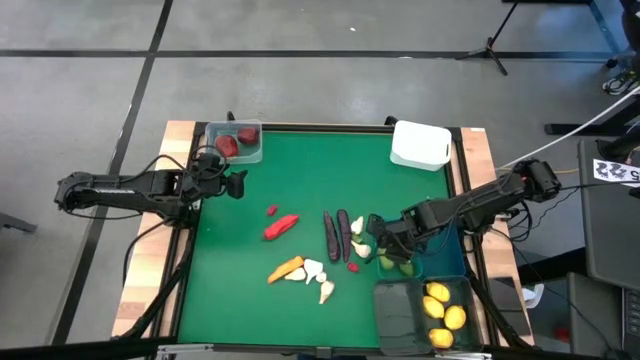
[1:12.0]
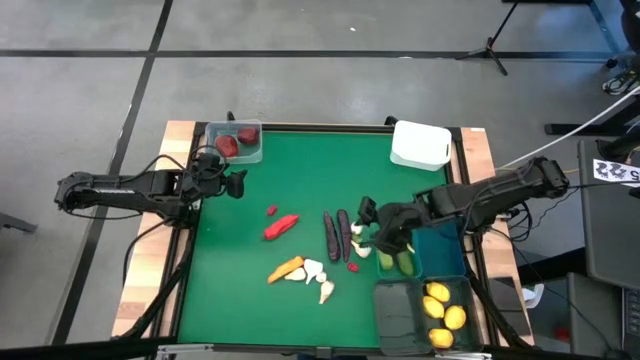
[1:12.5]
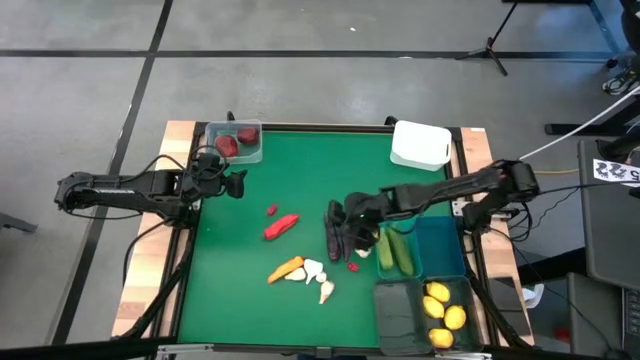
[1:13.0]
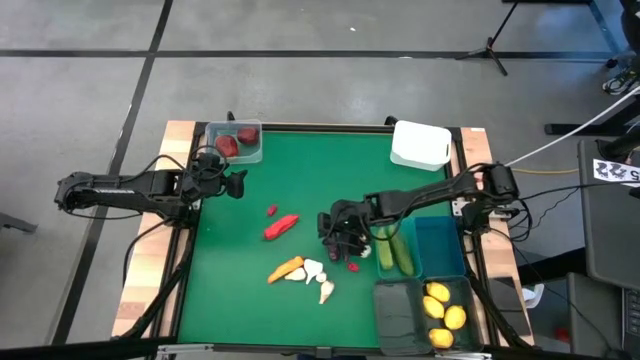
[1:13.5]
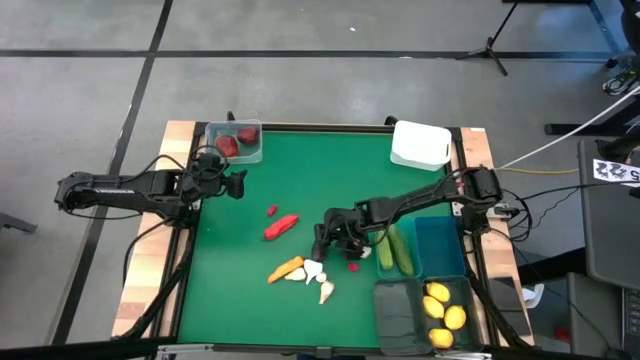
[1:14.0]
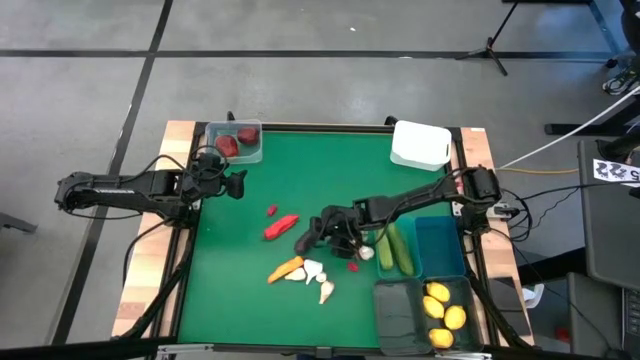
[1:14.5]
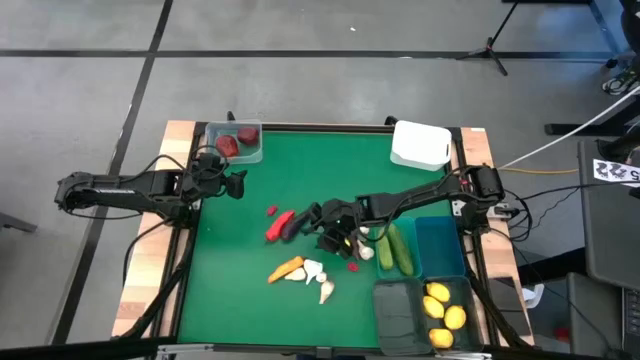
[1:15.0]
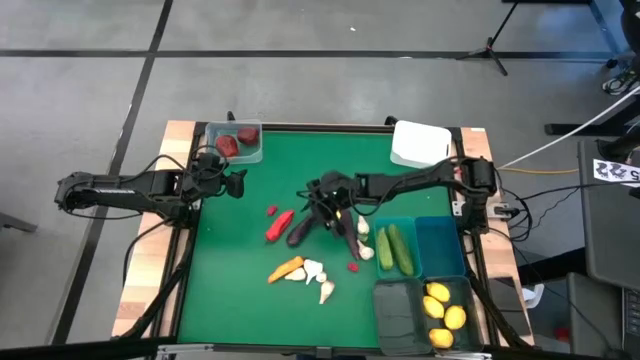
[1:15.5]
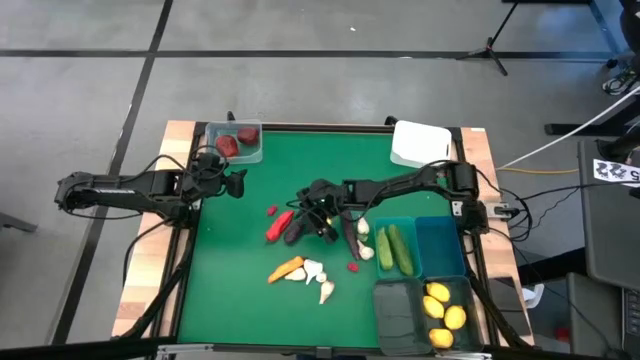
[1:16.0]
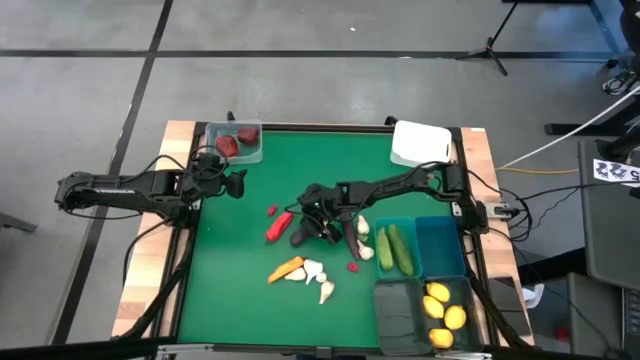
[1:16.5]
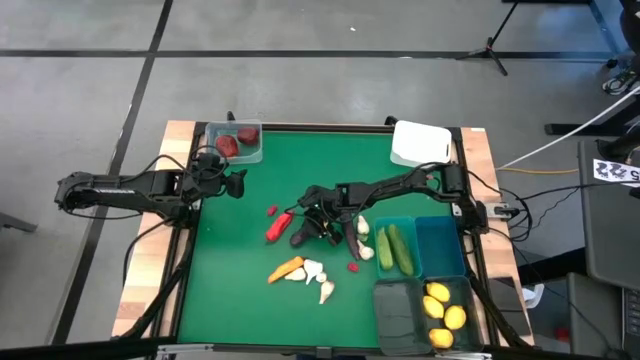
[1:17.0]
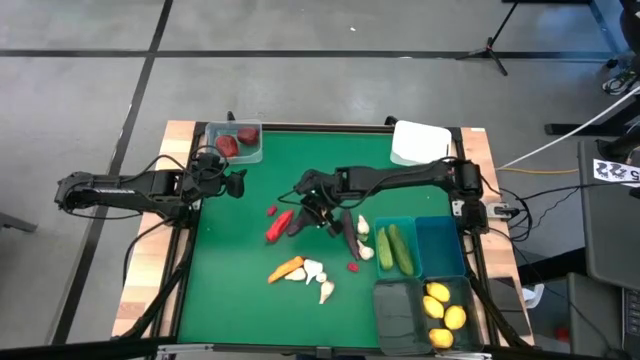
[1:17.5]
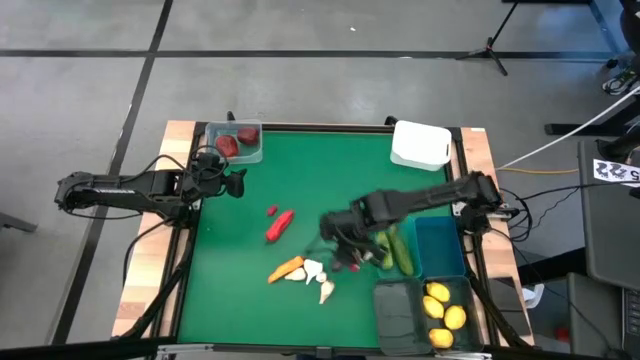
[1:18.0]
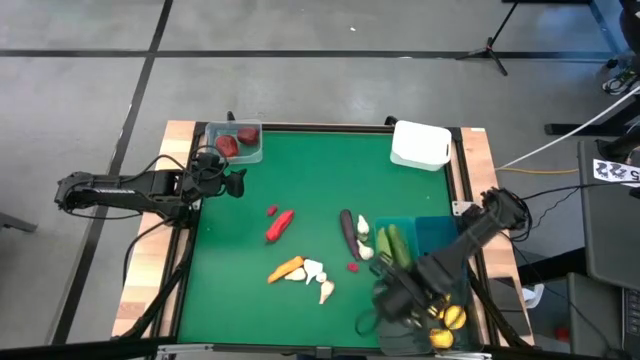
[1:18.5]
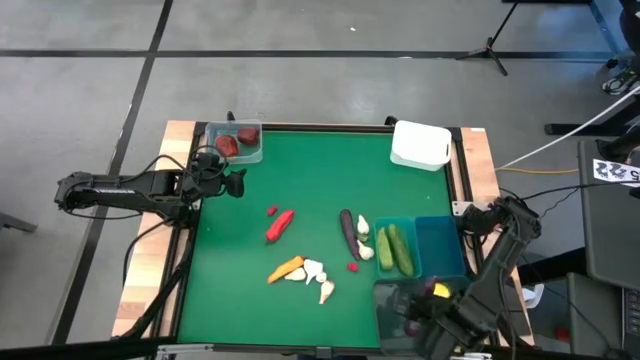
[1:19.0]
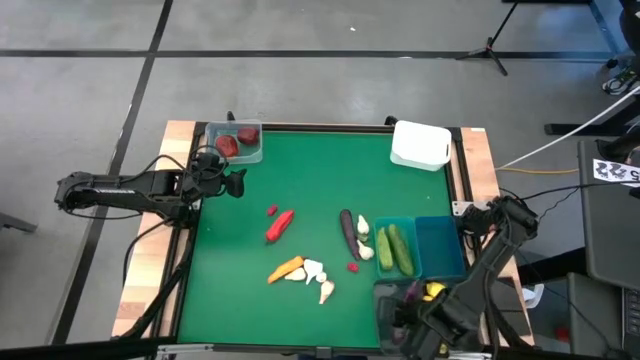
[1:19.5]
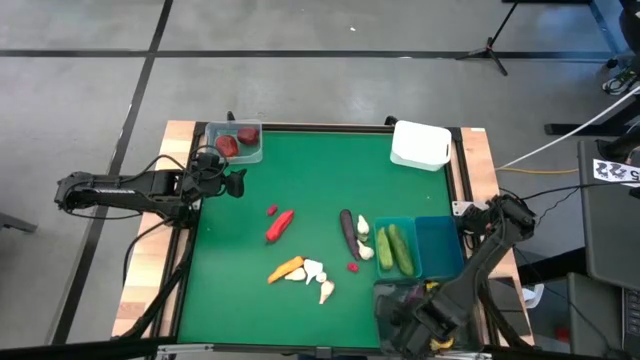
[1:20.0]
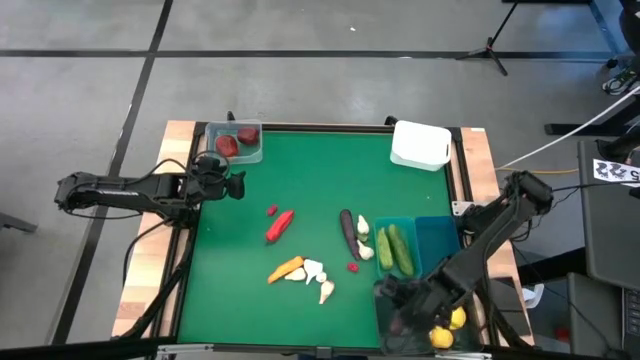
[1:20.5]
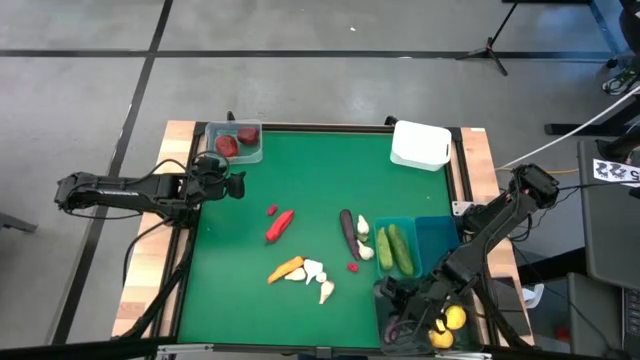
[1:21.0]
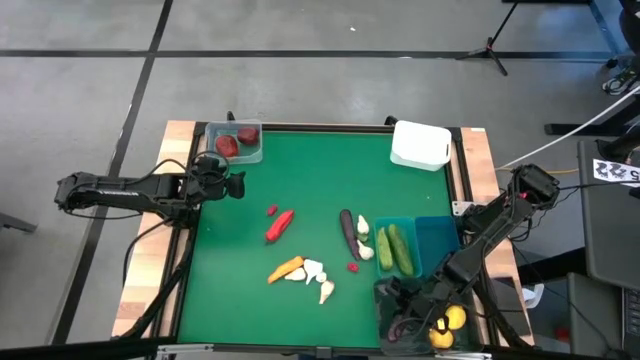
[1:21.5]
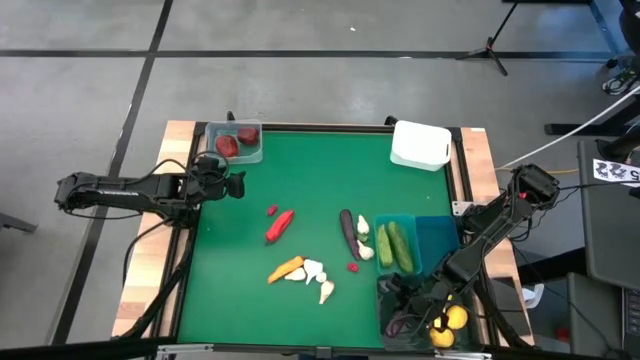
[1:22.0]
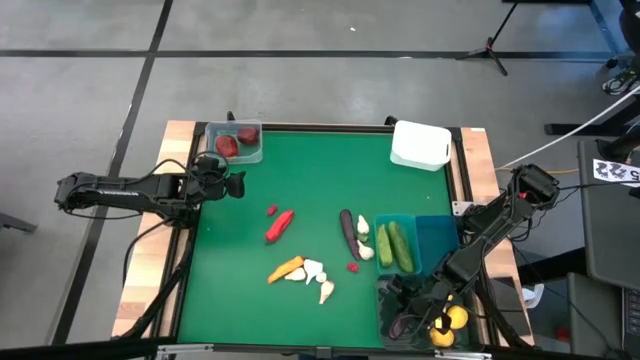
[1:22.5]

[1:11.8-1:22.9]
Task: Sort produce into baskets
Put the eggplant into the left black bin

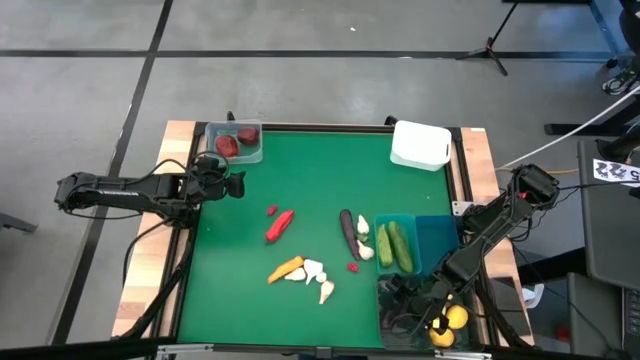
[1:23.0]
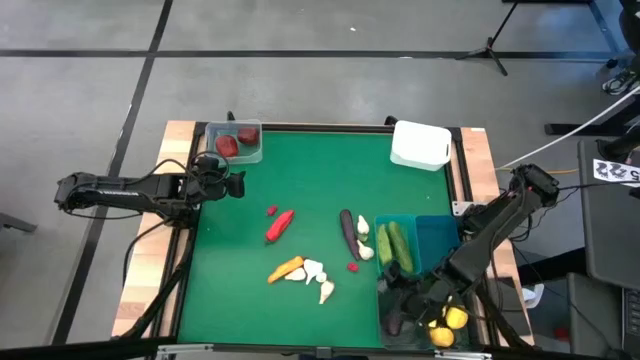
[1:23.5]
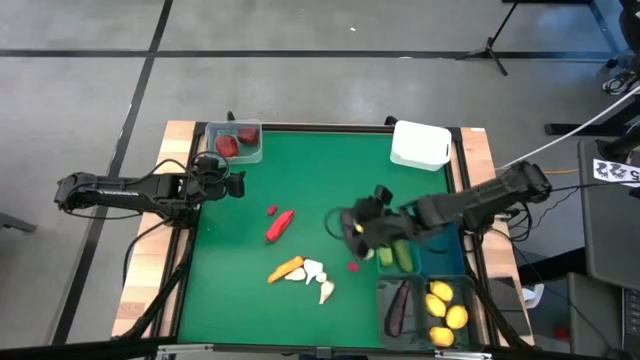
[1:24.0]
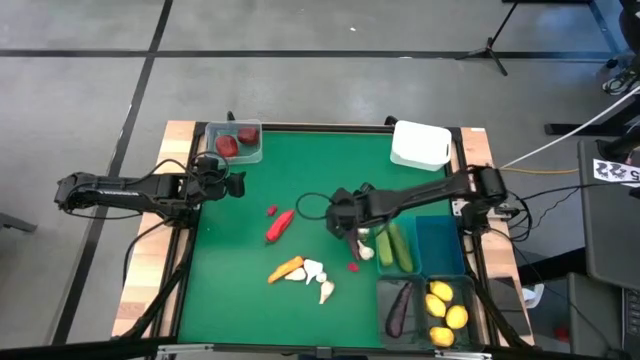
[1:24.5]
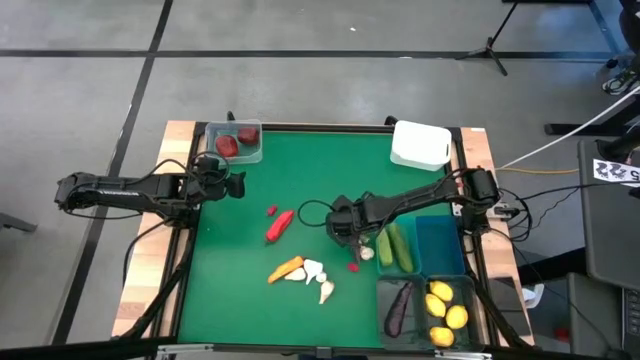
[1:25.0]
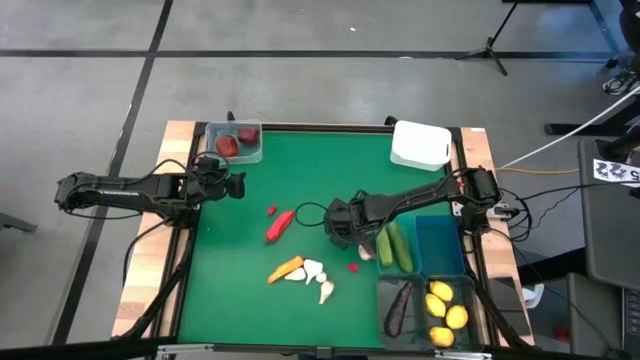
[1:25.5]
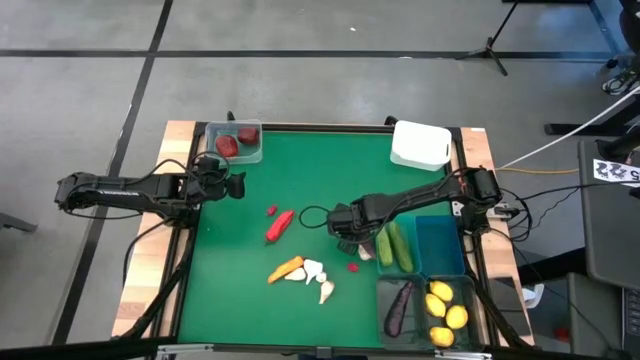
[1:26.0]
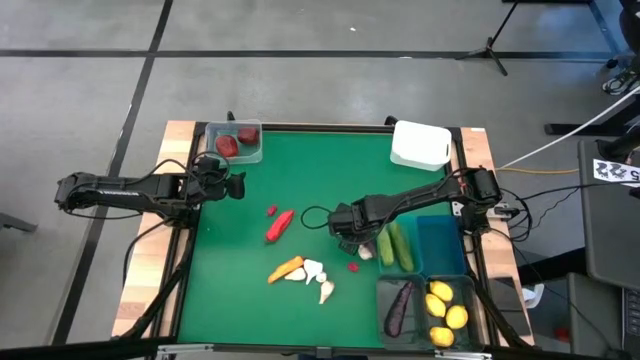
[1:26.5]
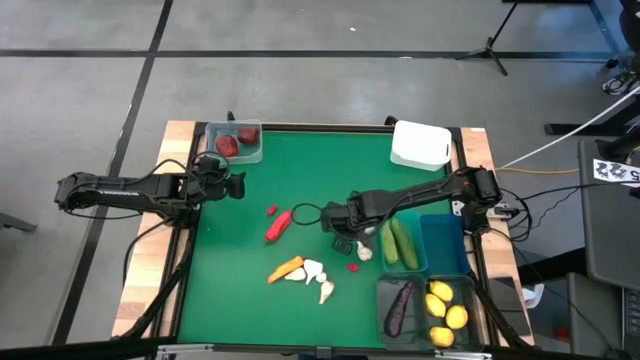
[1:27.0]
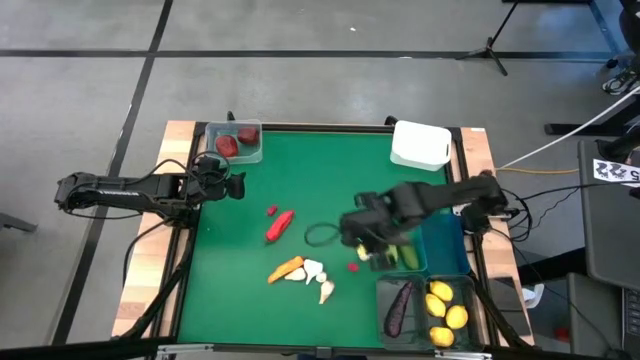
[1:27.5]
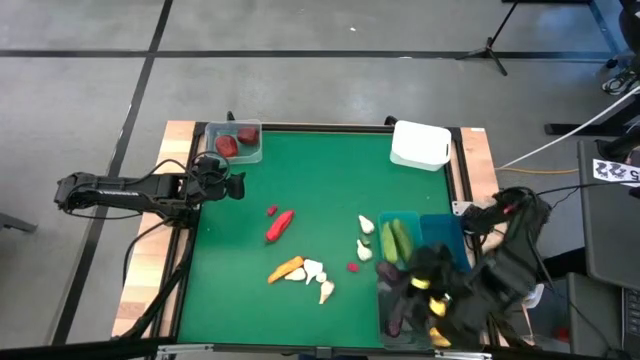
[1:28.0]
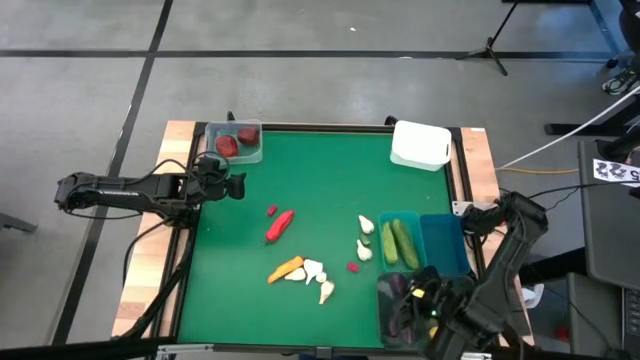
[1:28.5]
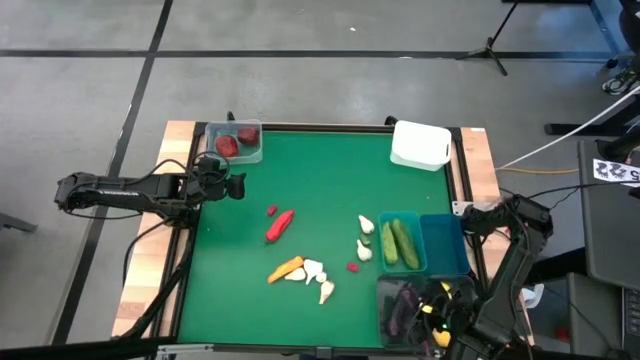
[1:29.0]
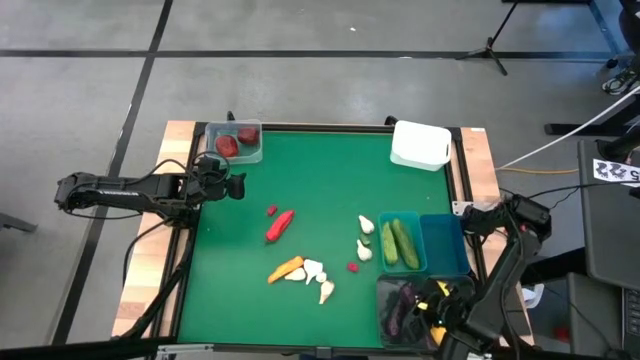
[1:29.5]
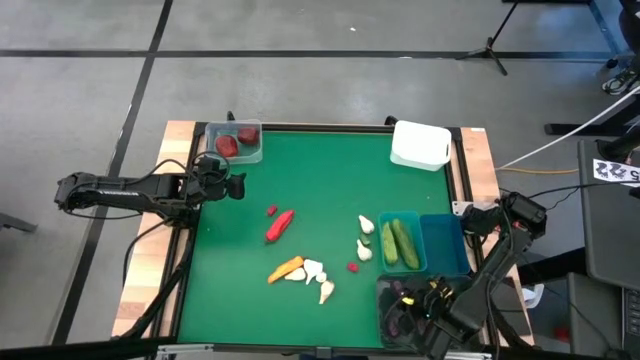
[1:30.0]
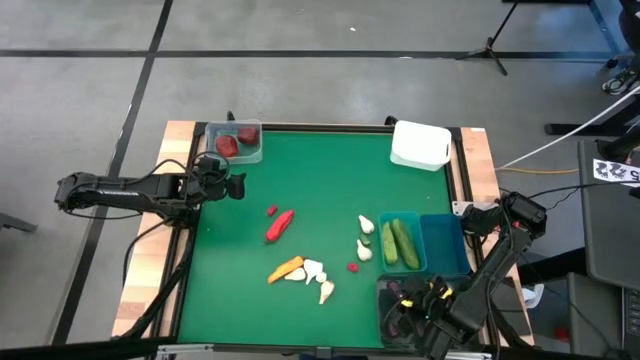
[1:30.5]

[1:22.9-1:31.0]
Put the eggplant into the left black bin

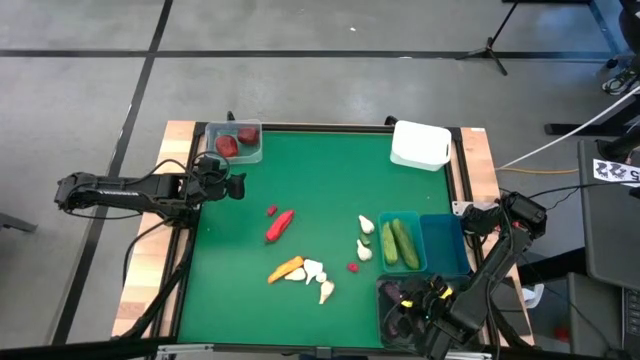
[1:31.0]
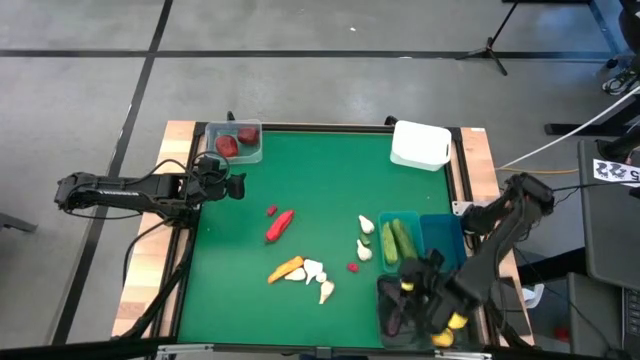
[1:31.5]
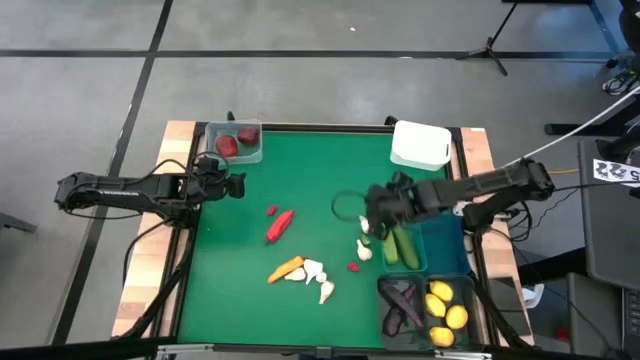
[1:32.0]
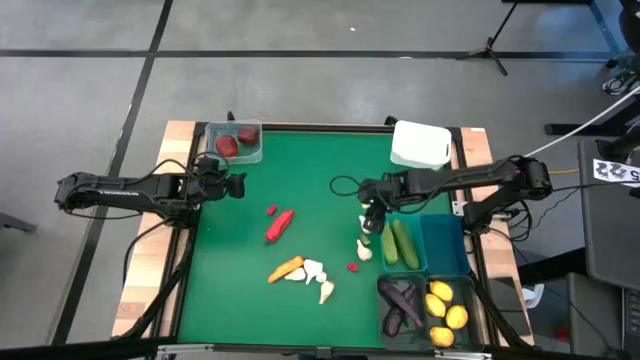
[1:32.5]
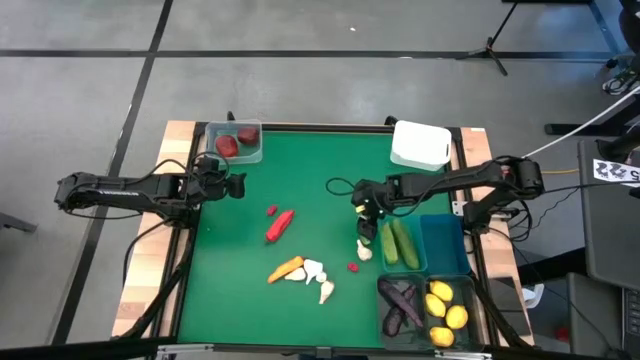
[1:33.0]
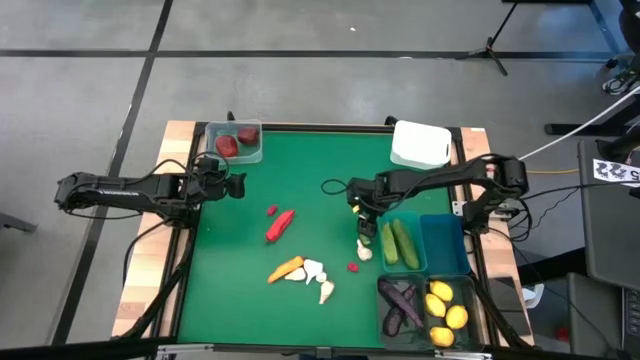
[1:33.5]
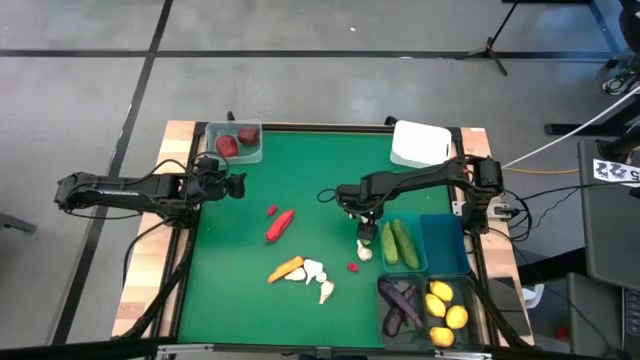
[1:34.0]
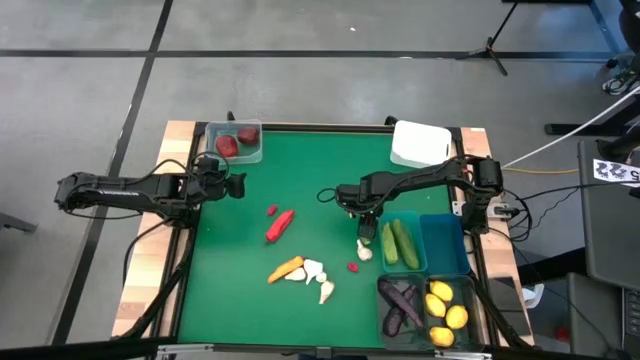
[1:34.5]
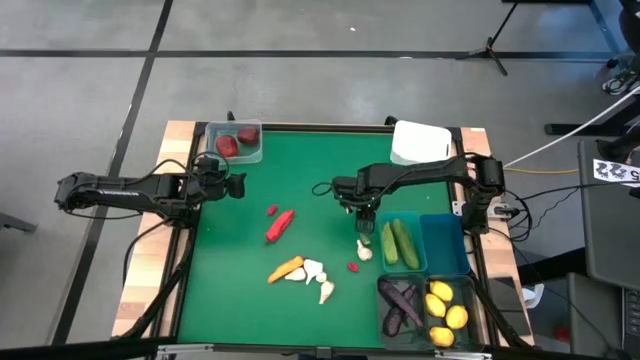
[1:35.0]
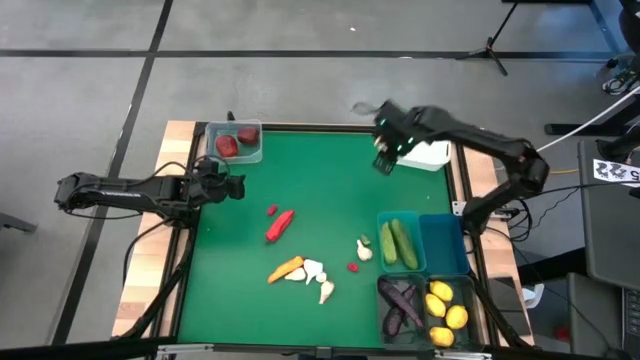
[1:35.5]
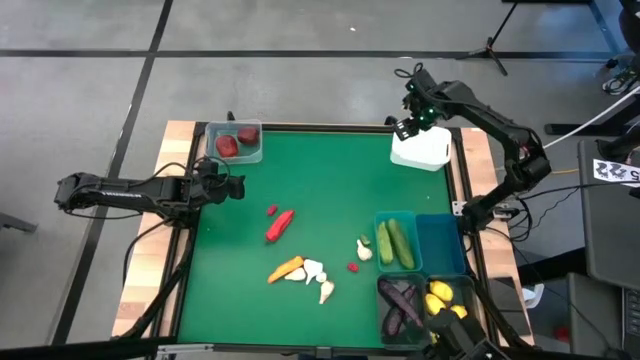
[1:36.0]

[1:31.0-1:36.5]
Put the garlic into the white bin
